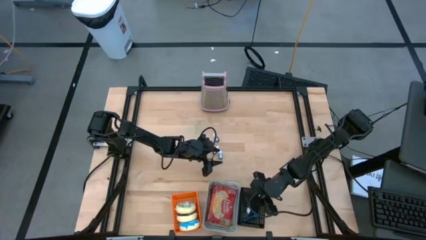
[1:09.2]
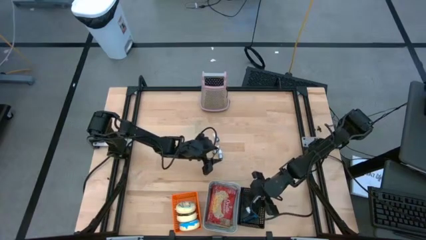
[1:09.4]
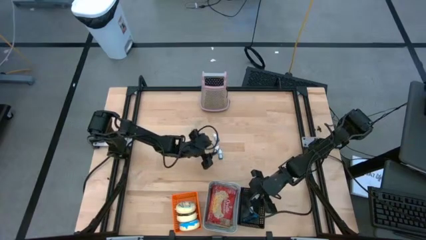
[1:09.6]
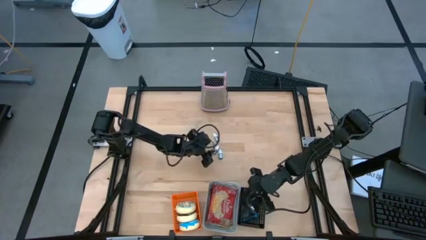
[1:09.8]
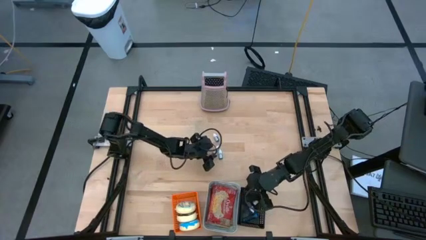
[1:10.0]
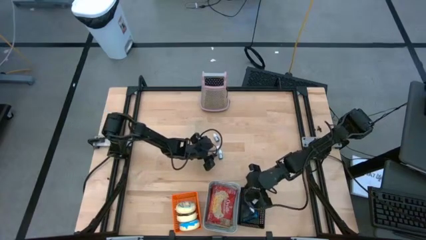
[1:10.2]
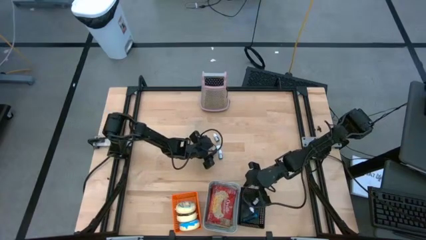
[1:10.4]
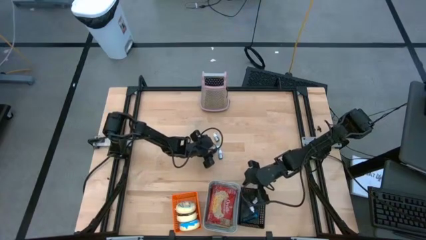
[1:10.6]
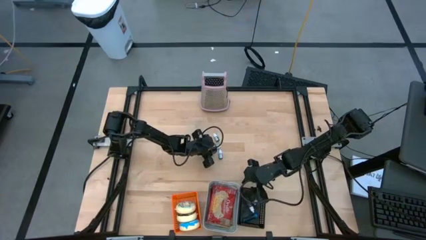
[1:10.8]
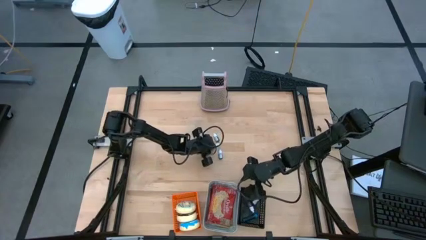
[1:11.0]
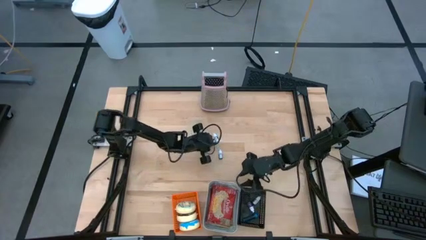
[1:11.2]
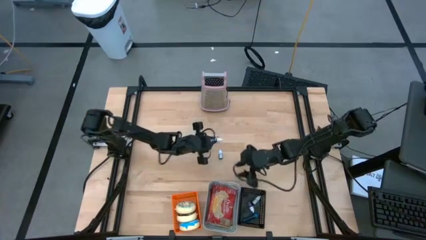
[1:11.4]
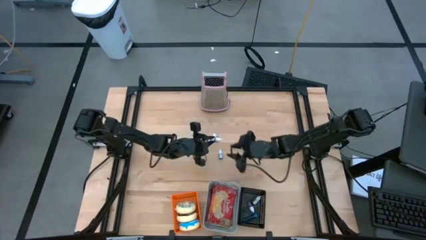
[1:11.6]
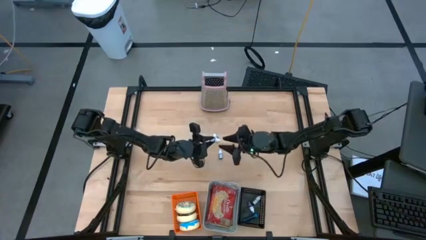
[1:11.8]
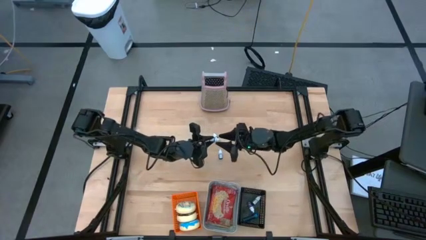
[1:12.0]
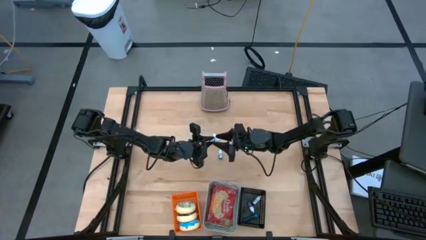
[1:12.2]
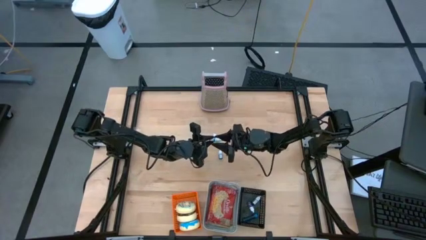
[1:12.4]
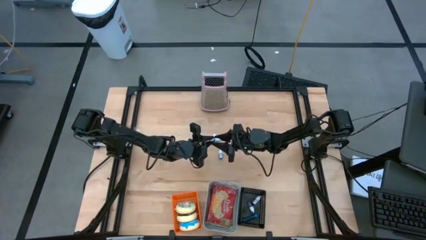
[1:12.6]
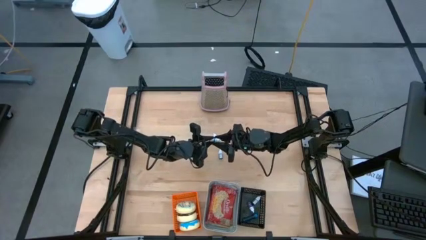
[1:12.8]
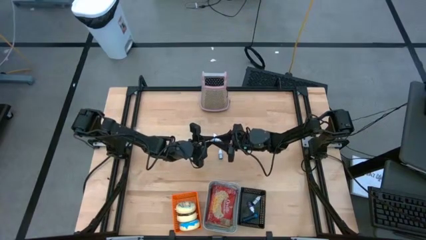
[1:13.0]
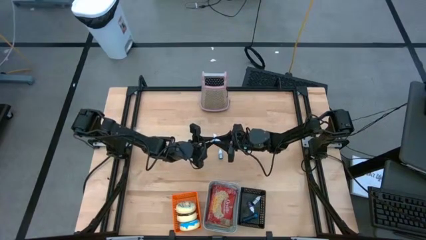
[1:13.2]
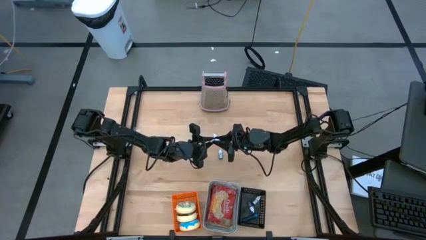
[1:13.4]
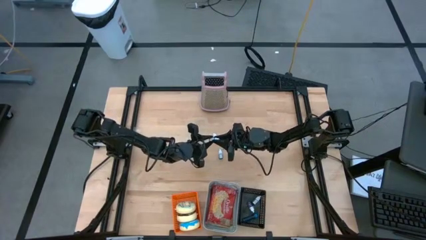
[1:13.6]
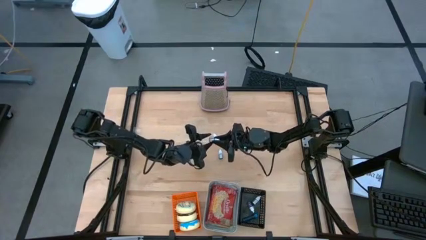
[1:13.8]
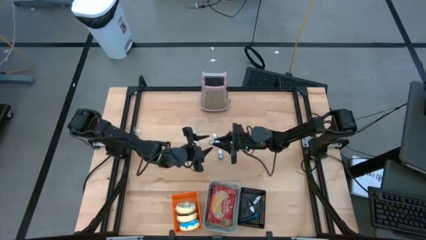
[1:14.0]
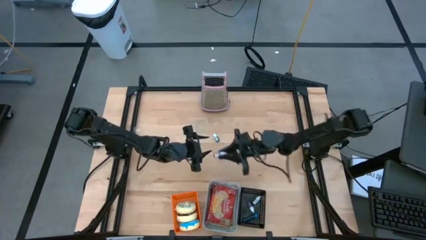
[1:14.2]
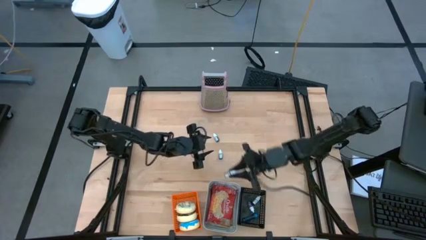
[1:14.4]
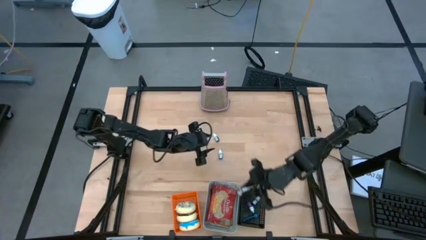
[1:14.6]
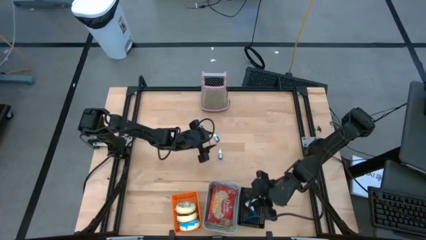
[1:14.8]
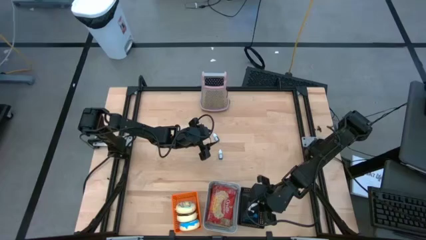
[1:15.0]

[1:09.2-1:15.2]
Put the brown food coloring bottle into the black bin

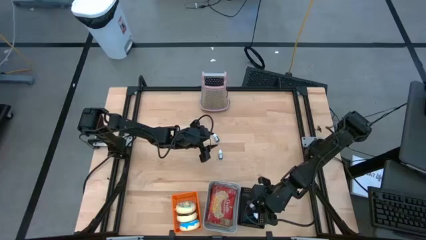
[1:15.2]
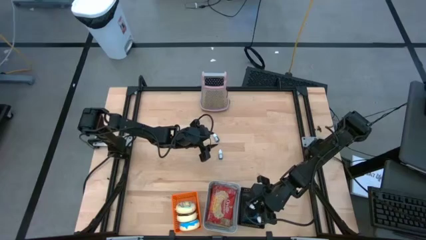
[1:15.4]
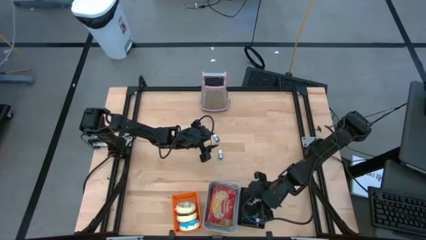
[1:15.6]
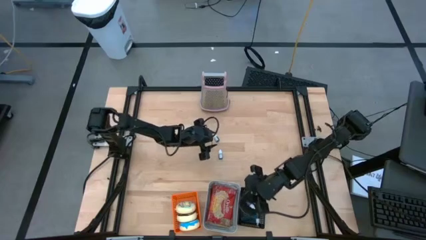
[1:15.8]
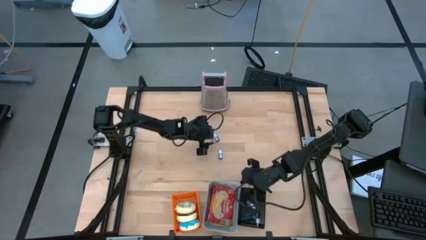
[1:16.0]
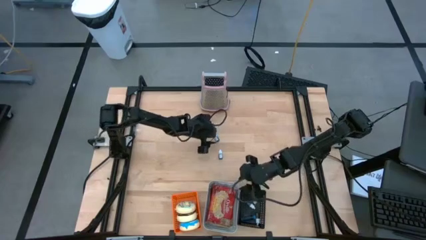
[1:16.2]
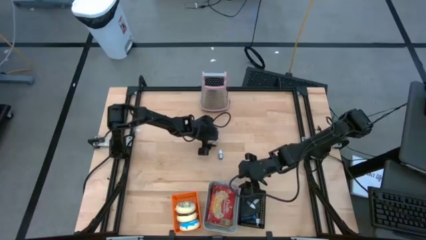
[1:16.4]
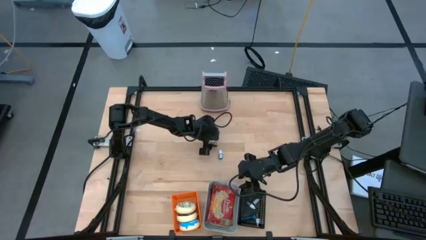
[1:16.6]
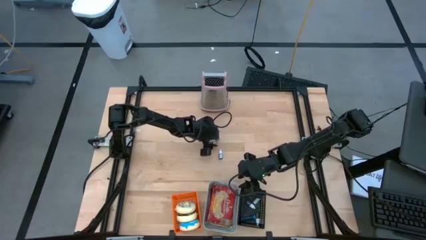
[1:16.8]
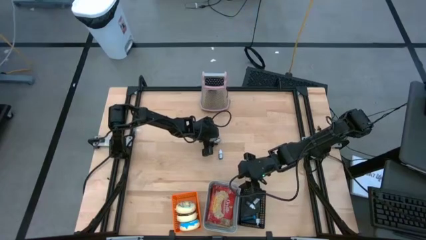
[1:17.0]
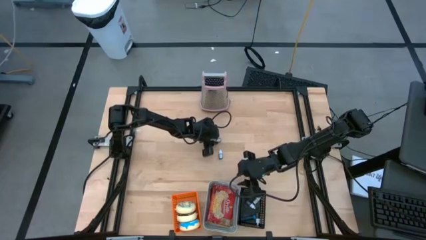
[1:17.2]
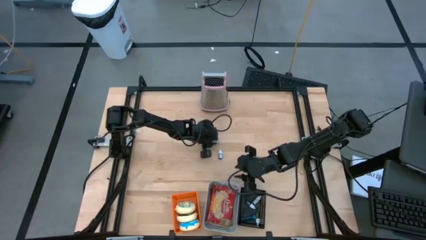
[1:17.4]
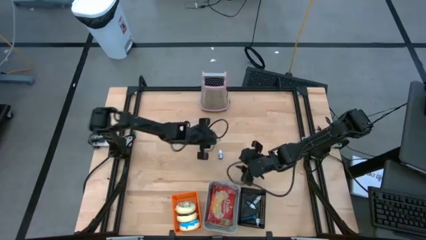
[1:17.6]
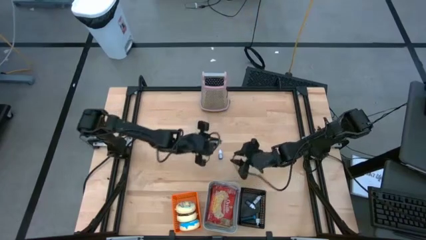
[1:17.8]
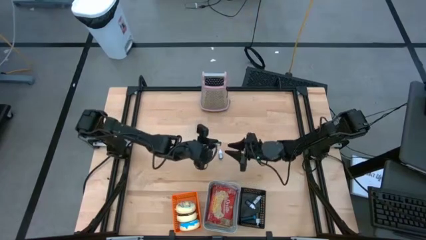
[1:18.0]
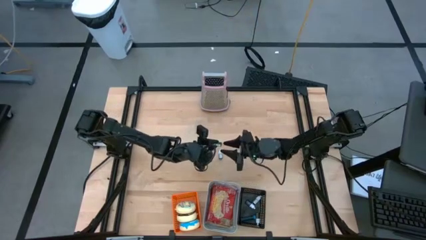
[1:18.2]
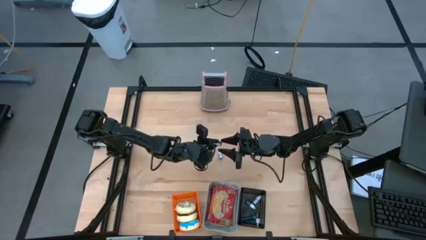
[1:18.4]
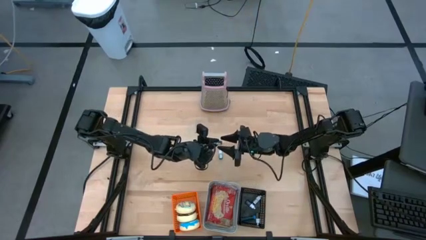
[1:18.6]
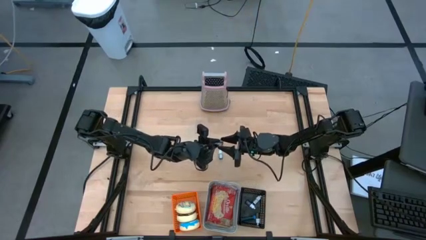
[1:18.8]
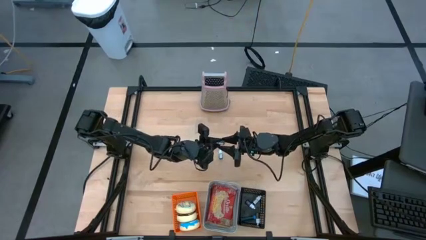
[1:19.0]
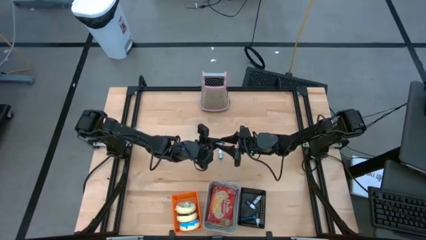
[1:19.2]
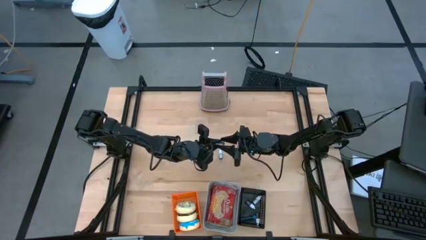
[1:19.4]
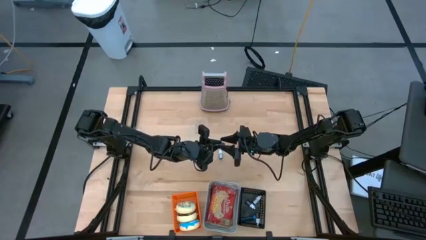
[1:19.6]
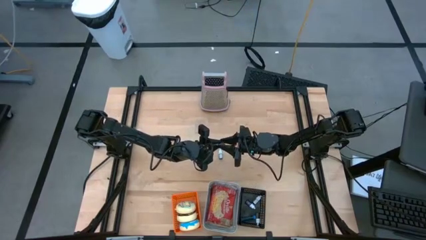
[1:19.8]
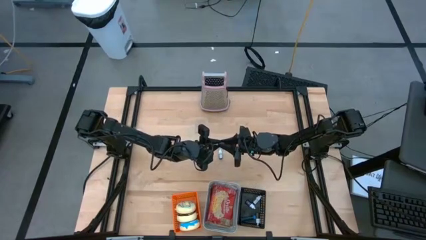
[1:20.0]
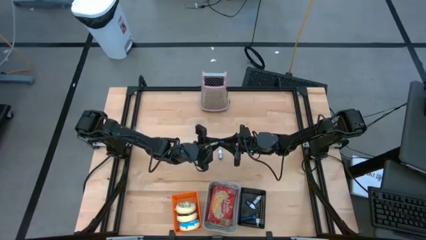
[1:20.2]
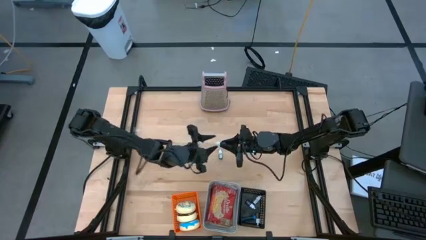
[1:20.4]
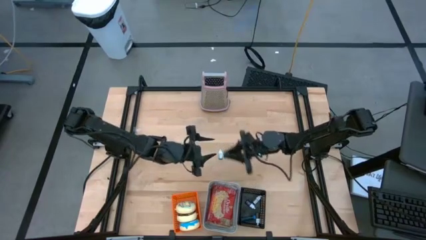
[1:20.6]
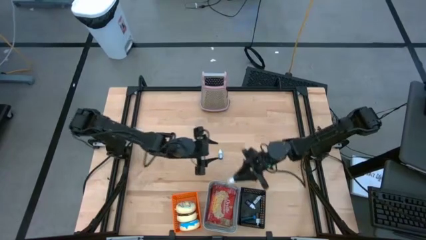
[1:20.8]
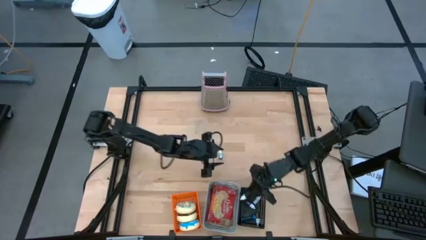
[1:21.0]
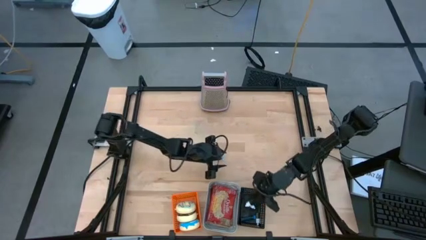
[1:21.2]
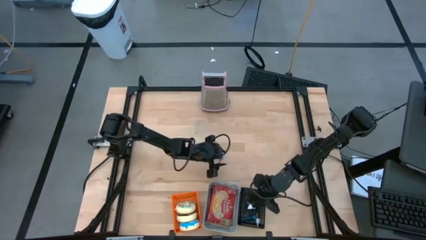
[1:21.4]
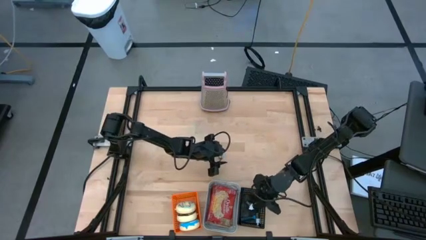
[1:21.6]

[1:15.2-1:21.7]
Put the green food coloring bottle into the black bin

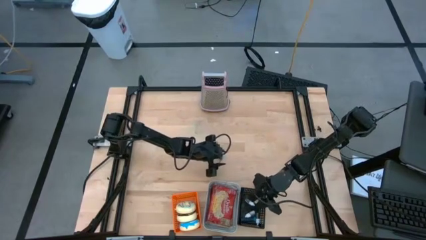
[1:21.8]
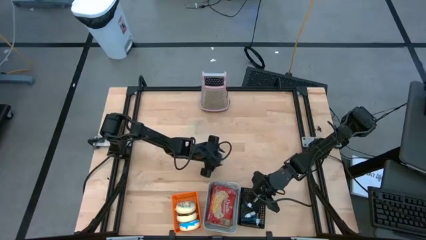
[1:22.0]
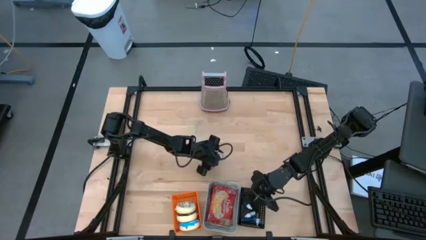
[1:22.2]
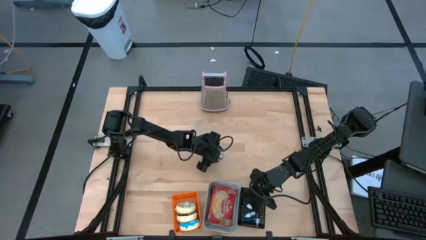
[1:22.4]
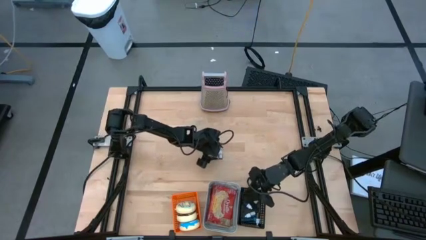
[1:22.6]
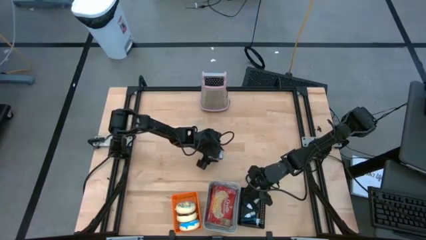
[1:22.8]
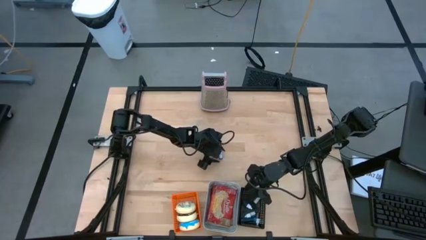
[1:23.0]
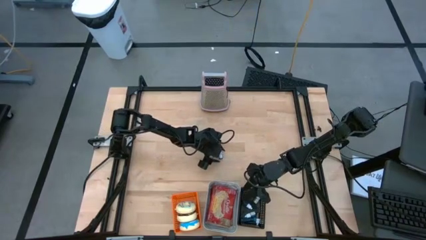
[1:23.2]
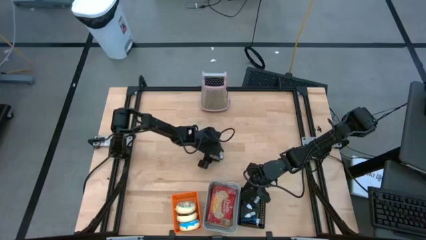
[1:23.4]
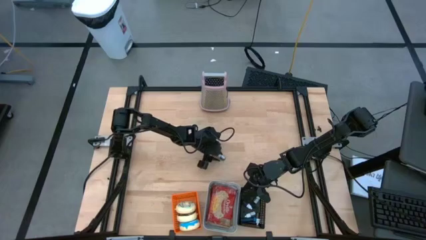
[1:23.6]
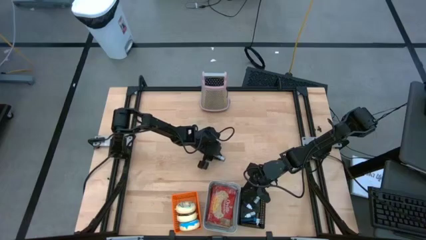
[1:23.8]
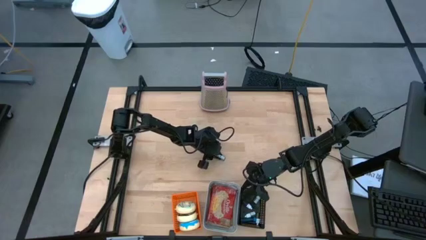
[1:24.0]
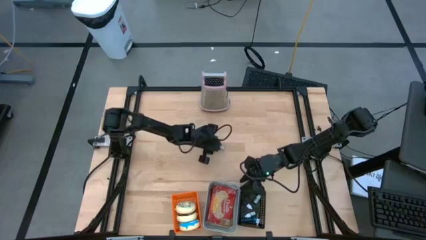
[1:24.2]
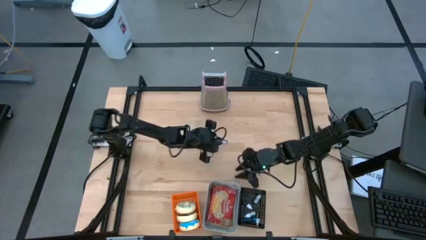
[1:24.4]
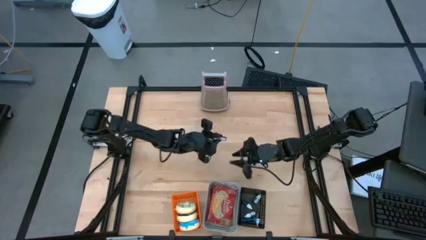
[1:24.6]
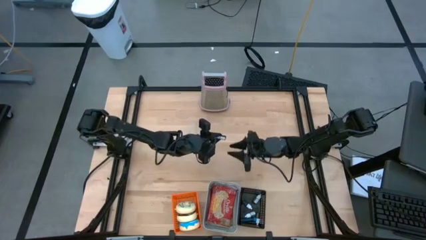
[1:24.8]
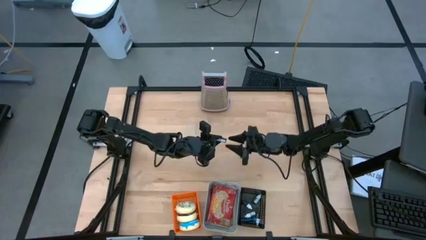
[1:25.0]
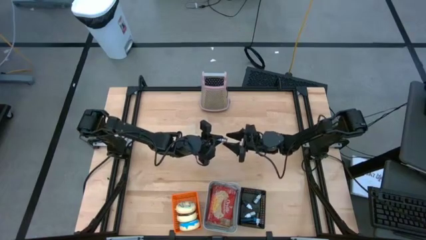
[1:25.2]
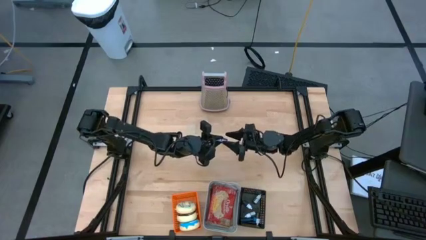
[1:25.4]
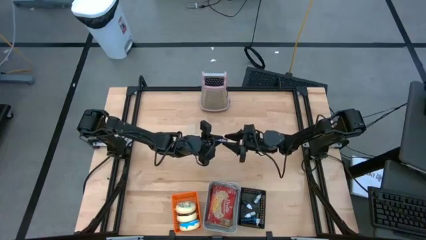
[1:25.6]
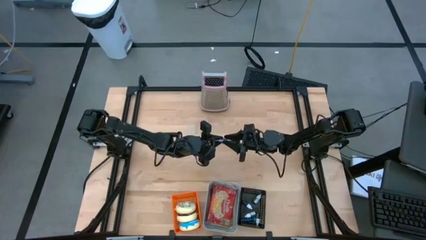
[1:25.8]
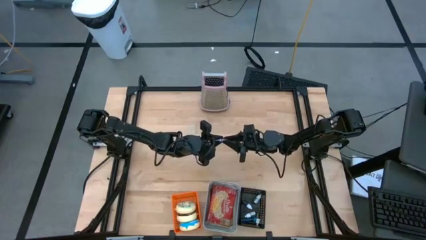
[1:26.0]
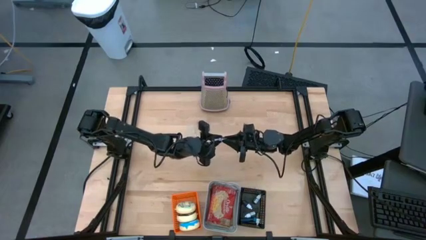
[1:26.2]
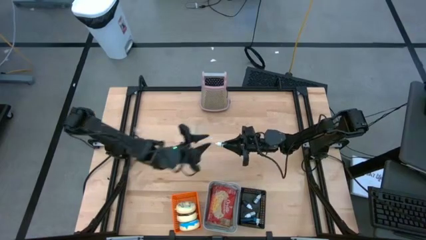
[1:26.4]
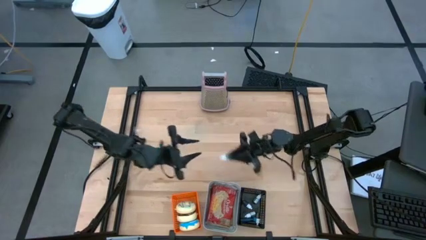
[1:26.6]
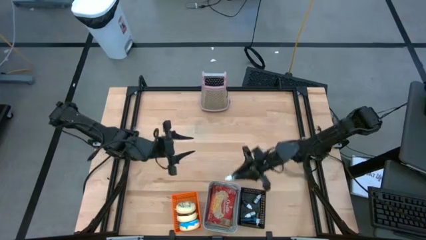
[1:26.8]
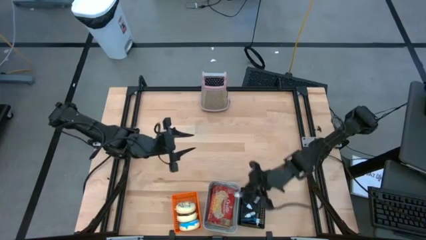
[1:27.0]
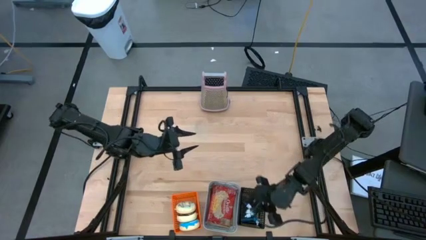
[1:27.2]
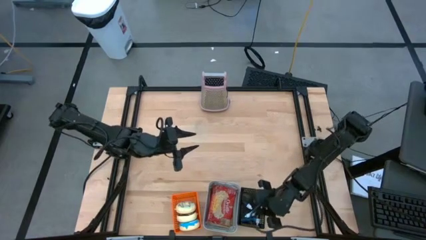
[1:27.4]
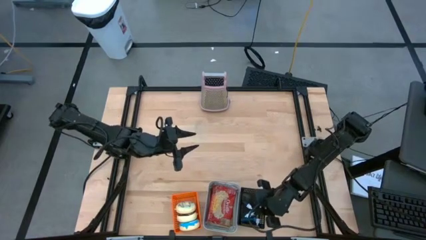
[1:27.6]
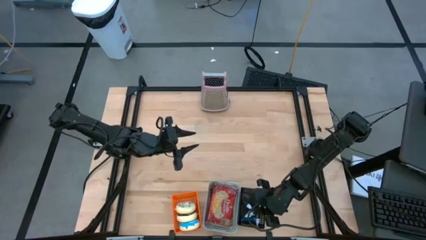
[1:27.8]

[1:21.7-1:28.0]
Put the blue food coloring bottle into the black bin
